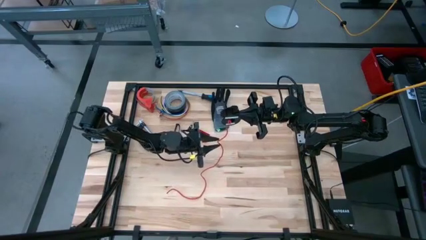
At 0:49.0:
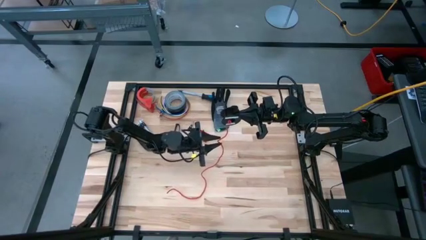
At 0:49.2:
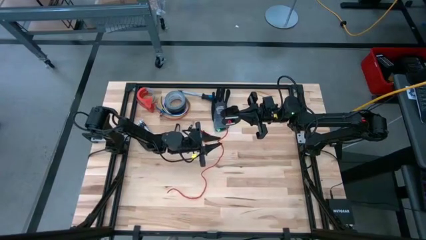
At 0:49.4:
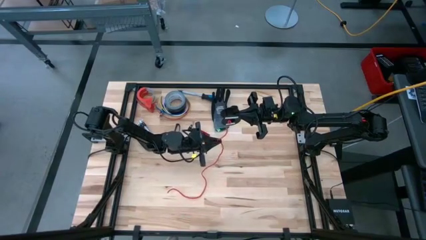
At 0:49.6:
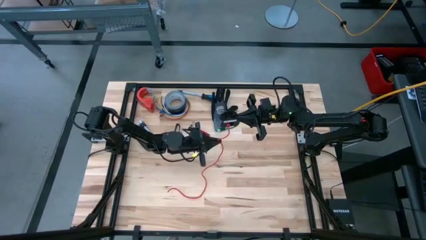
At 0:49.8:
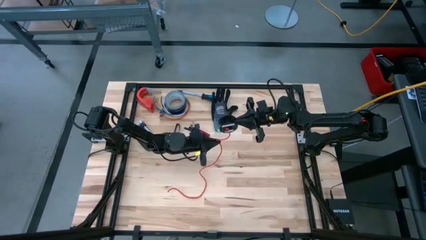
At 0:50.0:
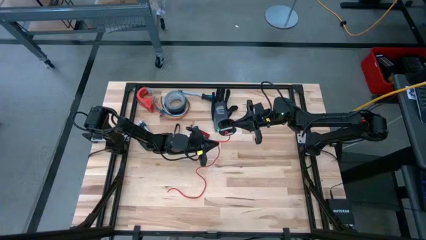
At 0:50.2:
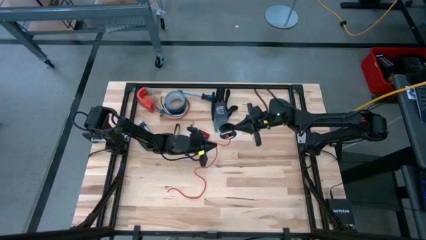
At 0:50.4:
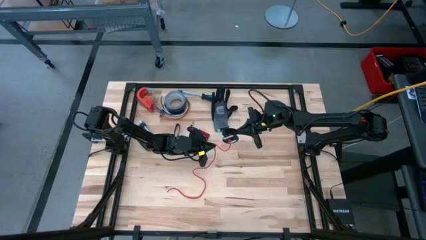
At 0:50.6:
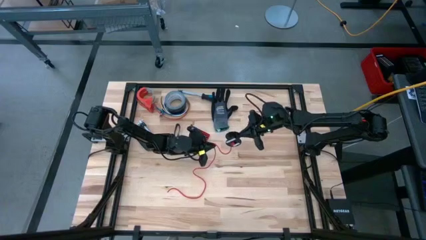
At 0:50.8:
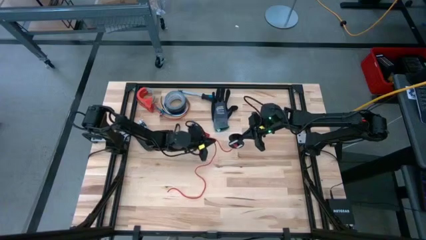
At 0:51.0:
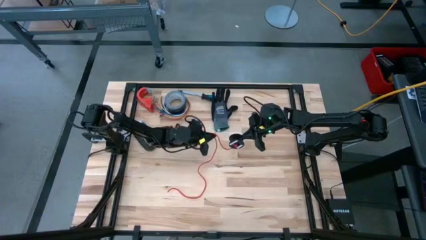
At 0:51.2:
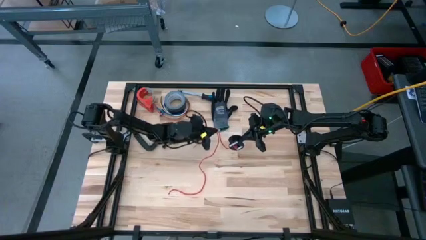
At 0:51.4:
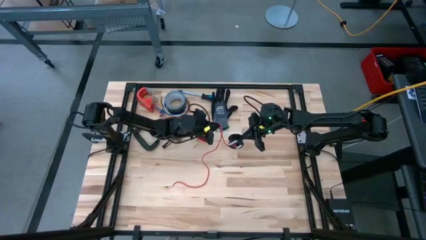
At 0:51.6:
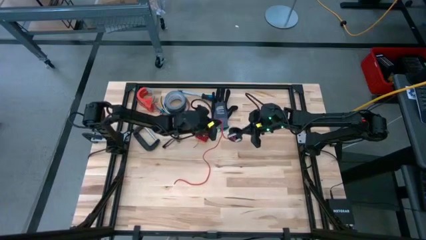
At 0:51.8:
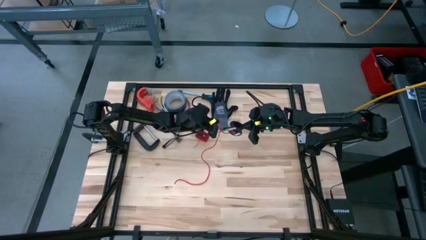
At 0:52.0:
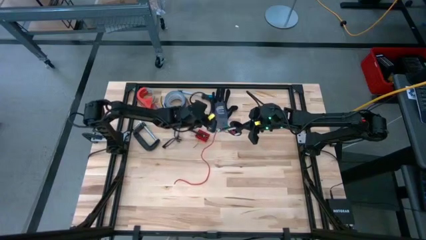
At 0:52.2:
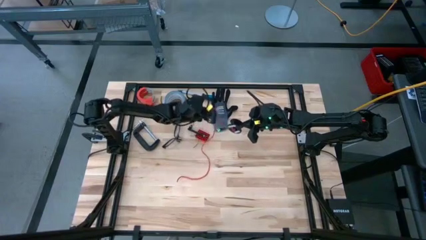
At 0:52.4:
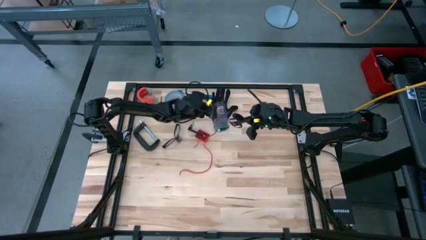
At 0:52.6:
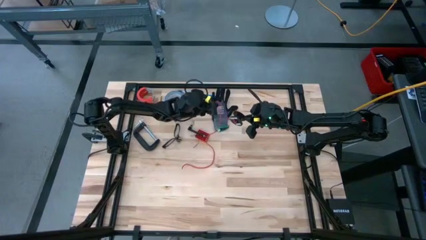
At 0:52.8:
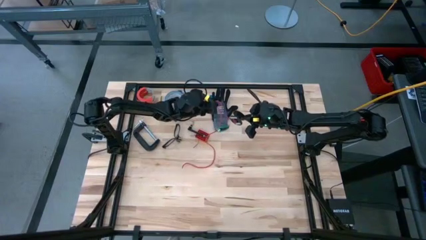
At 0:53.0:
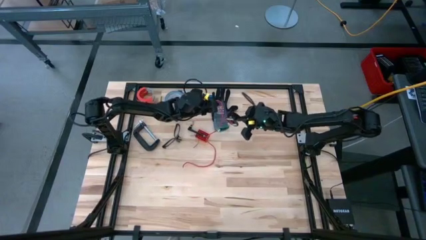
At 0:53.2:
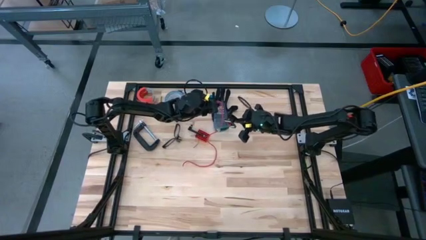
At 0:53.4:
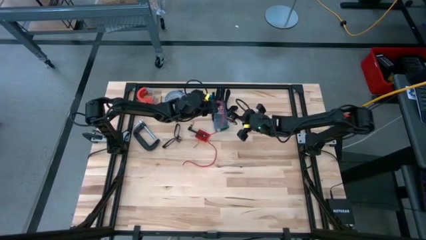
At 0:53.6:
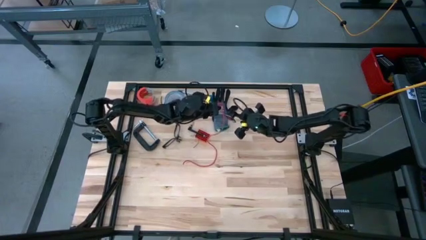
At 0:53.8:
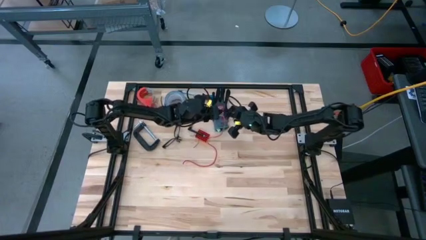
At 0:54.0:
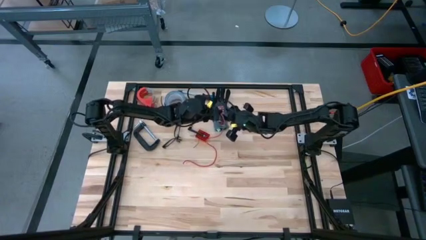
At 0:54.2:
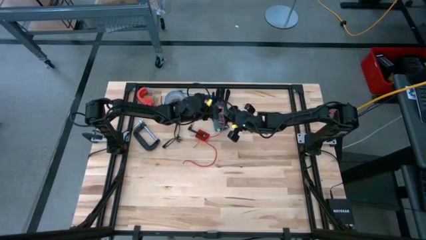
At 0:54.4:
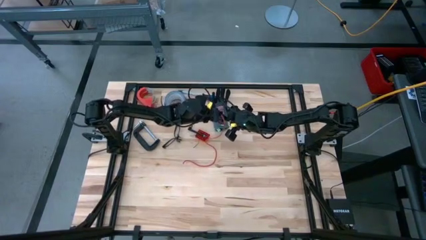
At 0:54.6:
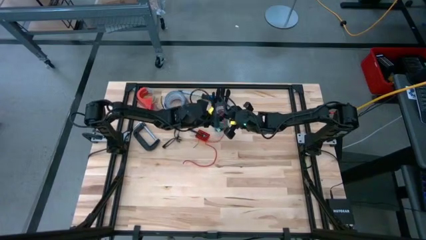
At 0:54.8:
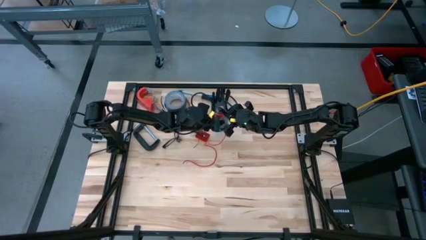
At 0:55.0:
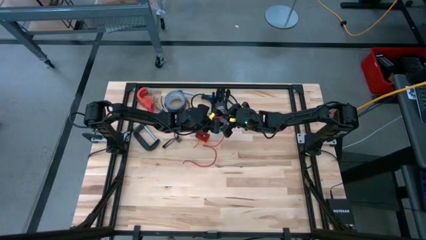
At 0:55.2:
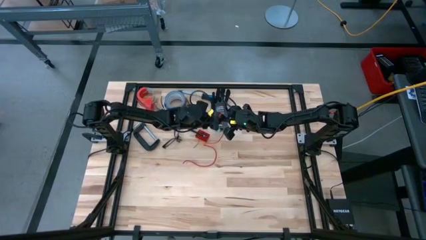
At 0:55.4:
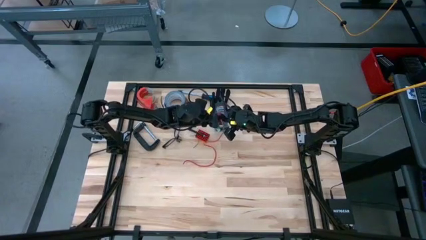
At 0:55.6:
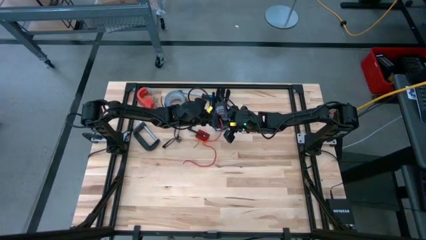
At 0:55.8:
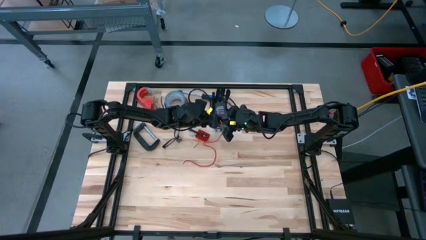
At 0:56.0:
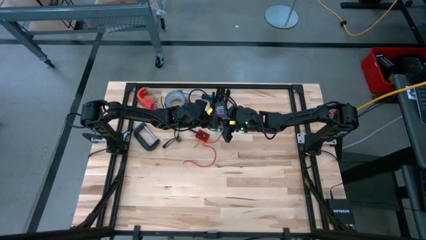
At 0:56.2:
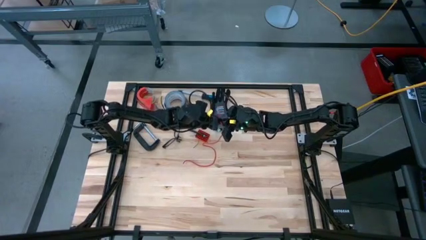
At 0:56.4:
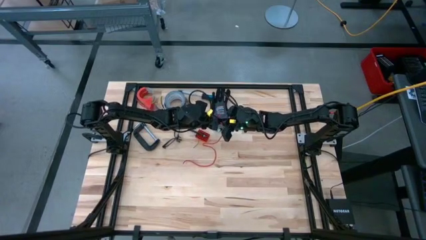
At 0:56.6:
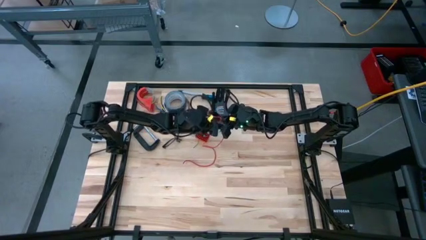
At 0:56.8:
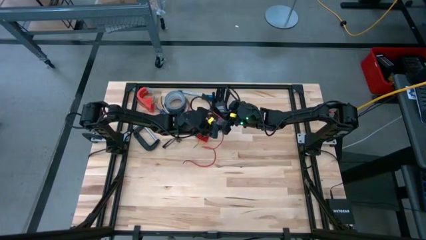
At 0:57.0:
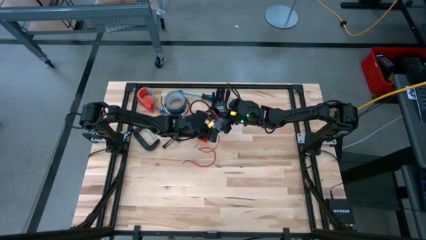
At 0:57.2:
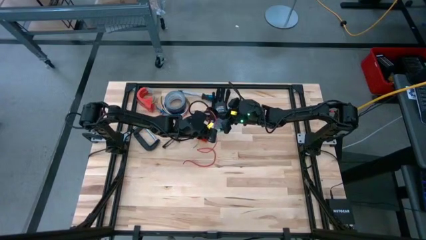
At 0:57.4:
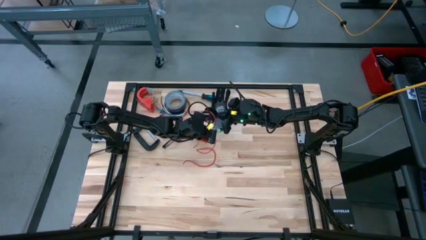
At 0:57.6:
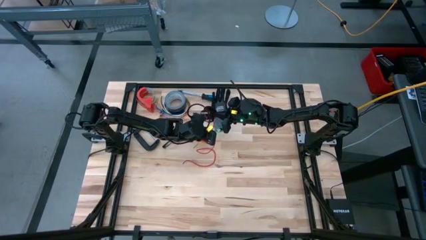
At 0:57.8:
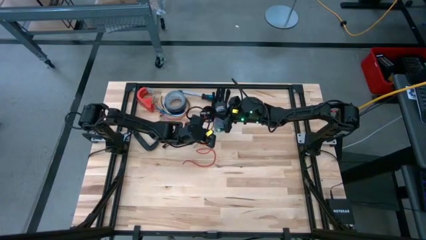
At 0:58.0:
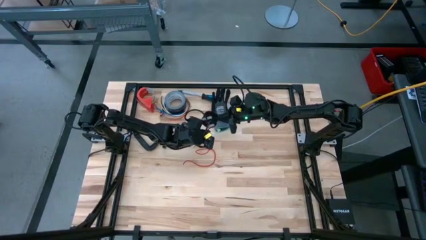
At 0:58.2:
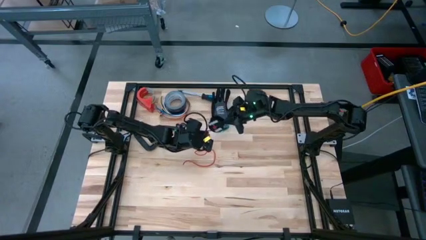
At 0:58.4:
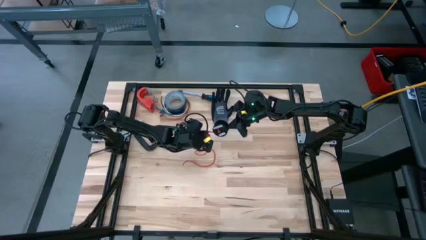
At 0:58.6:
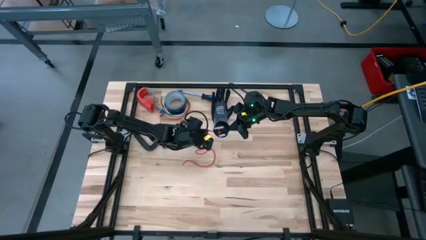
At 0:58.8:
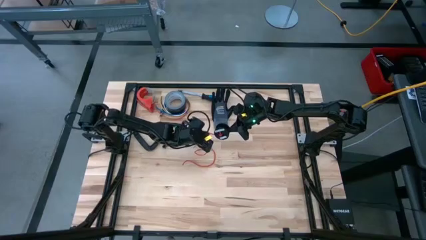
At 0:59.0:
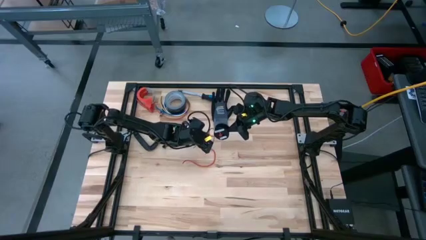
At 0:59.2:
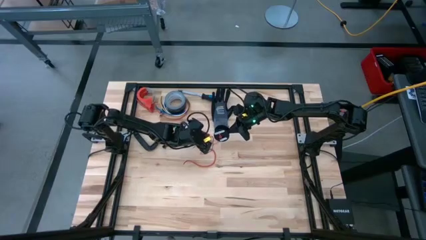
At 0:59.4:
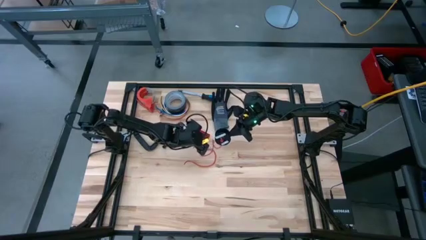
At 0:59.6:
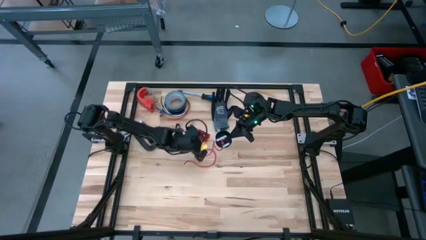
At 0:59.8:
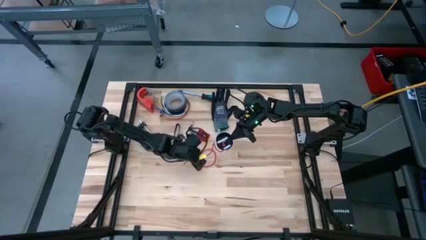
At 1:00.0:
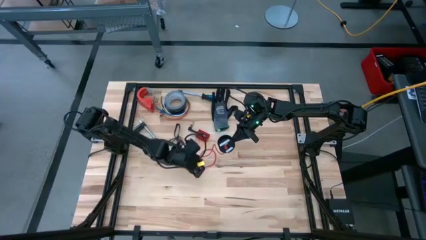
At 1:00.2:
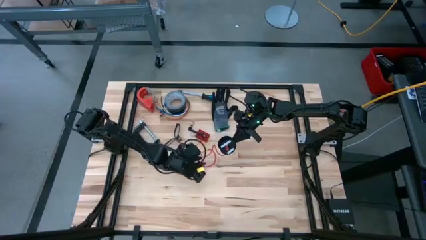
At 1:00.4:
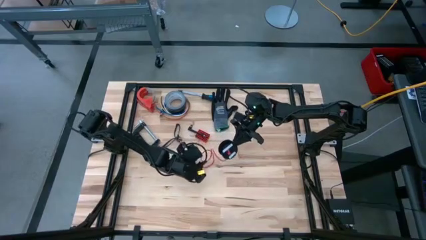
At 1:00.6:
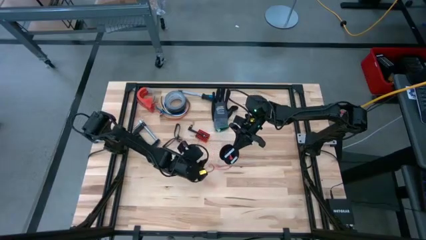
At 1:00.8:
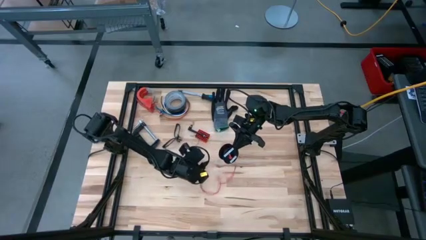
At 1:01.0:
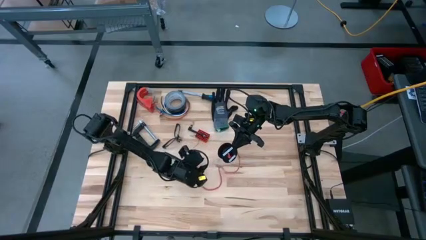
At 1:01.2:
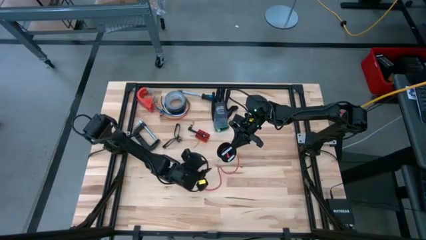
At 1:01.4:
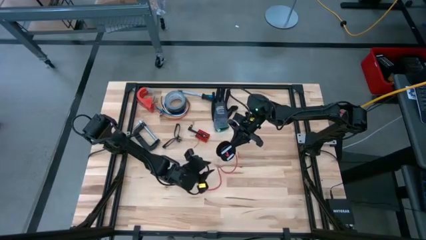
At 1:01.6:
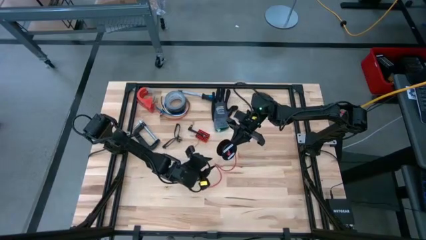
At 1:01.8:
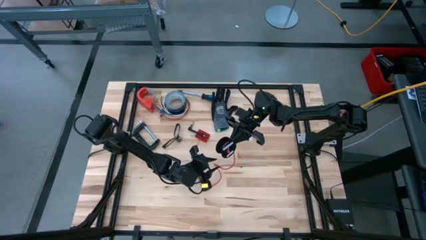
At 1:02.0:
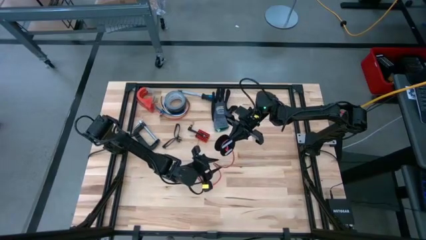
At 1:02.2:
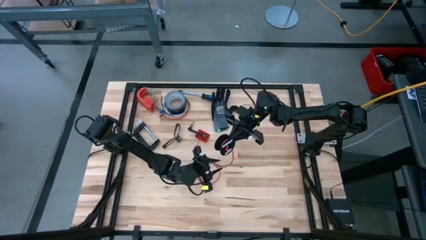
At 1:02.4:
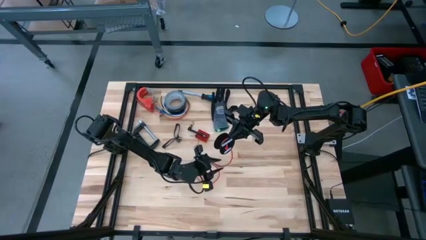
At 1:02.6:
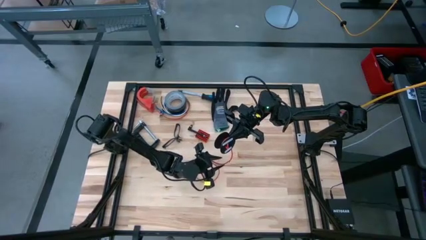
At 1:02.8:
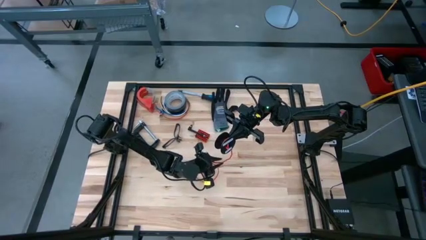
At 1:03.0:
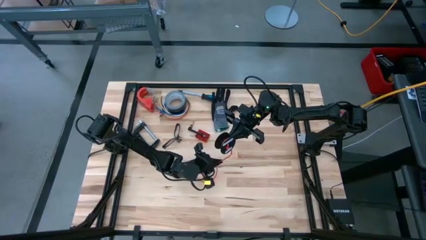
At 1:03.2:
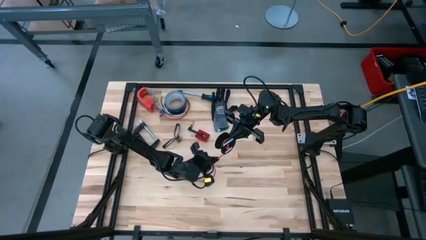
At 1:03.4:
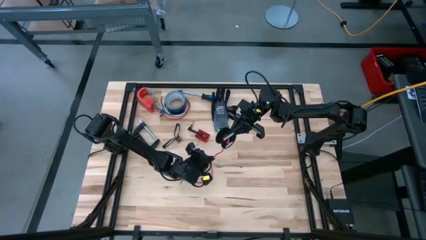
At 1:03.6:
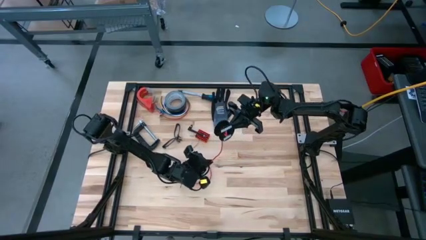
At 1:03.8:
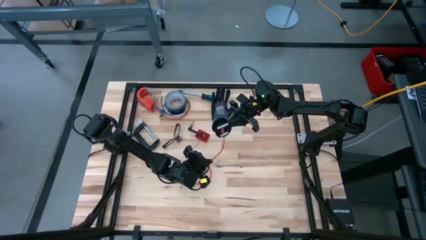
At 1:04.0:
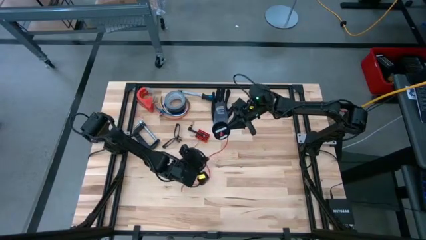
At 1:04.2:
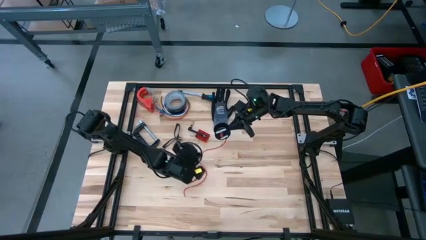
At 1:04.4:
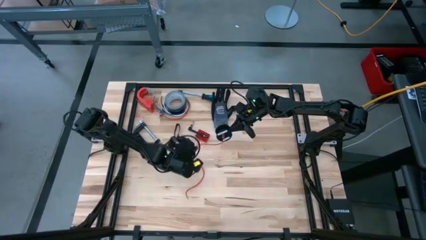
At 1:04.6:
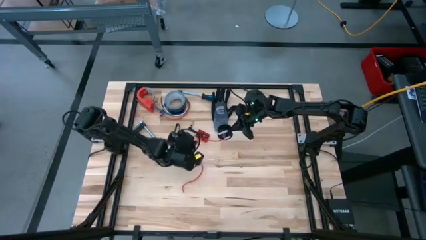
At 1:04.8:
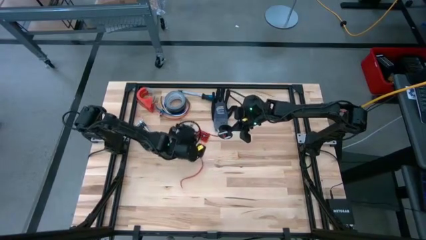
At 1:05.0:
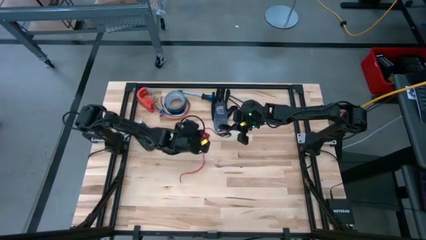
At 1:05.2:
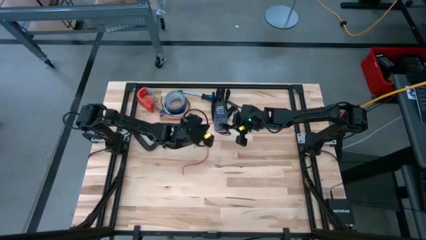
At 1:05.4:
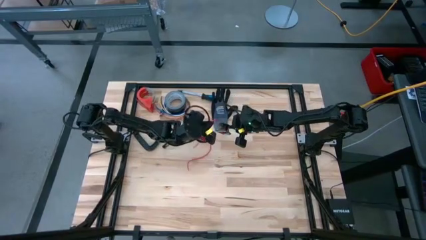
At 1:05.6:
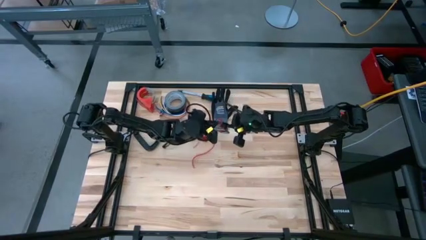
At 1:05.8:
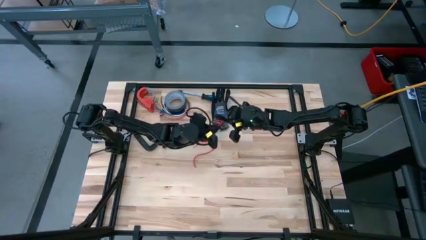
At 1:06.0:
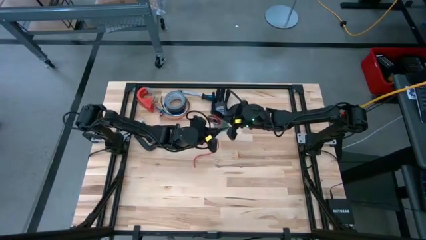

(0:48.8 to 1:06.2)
Task: Coil cords
Coil the orange wire into the black spool
